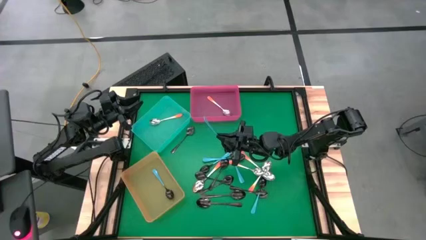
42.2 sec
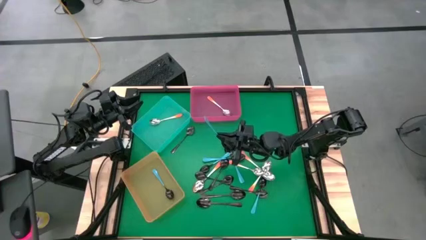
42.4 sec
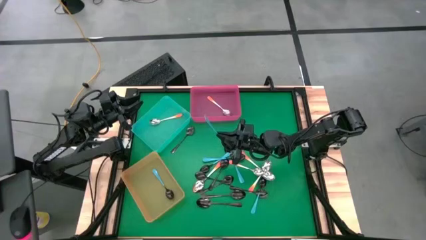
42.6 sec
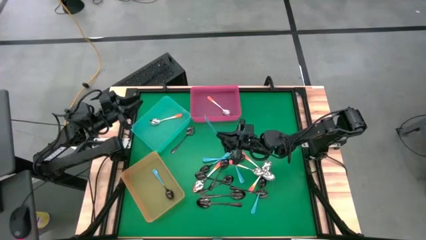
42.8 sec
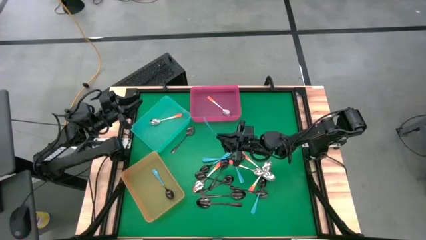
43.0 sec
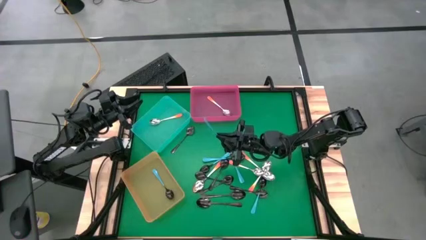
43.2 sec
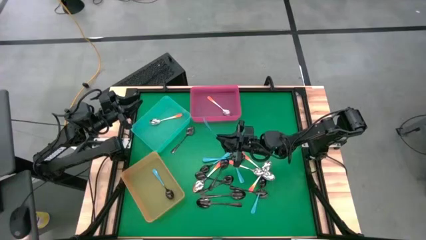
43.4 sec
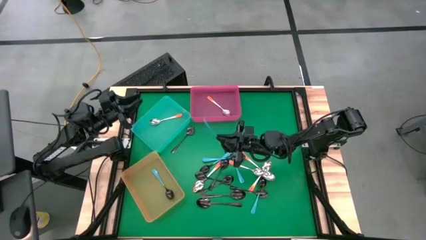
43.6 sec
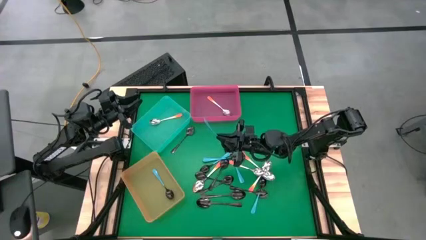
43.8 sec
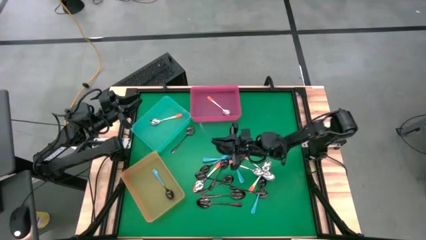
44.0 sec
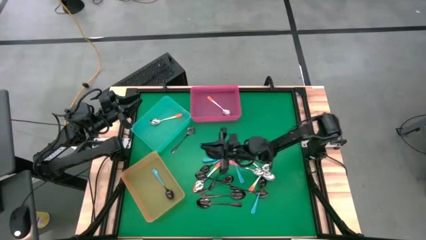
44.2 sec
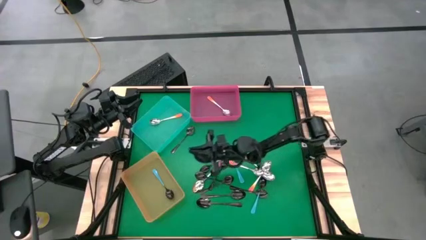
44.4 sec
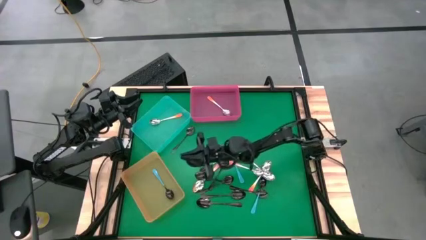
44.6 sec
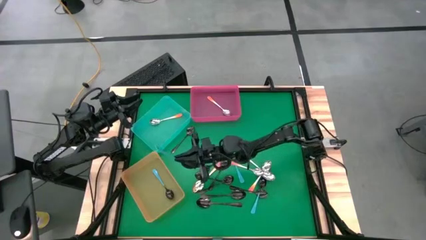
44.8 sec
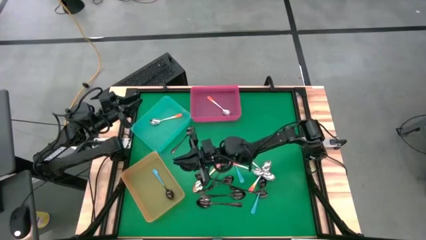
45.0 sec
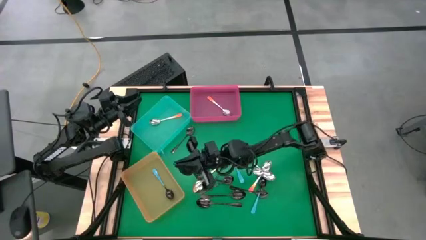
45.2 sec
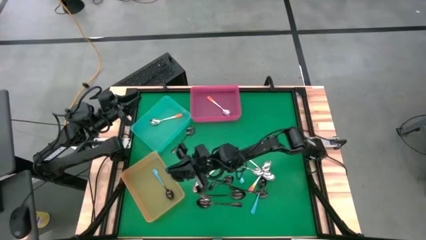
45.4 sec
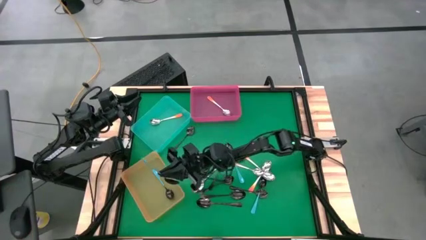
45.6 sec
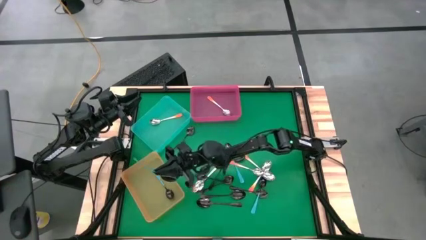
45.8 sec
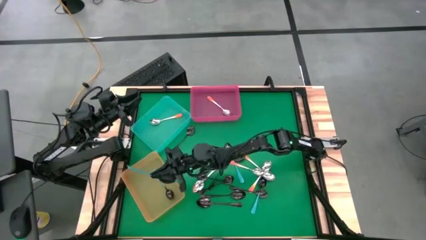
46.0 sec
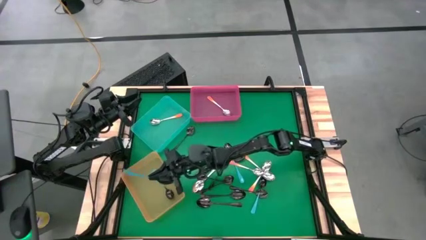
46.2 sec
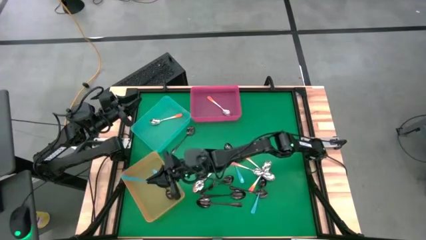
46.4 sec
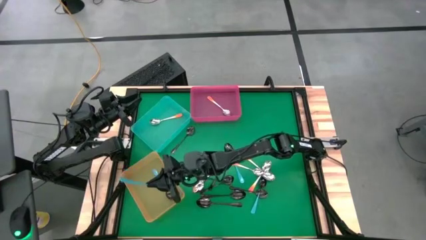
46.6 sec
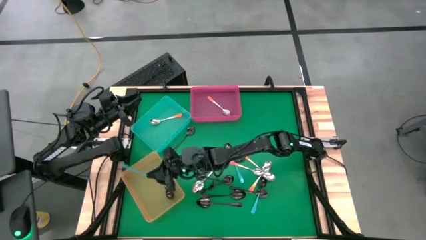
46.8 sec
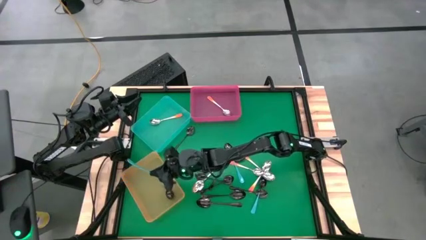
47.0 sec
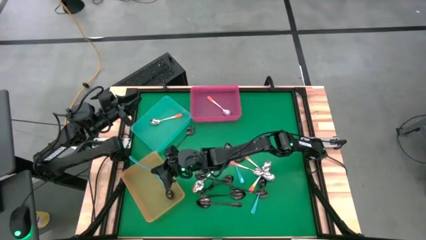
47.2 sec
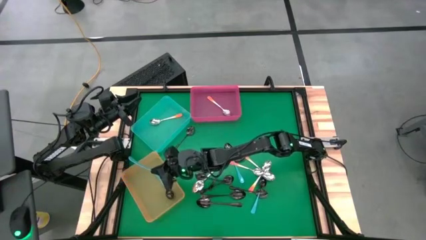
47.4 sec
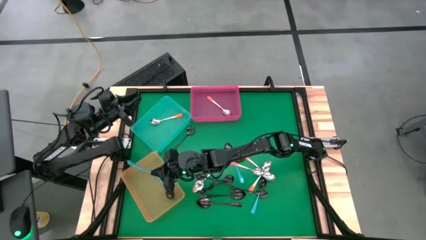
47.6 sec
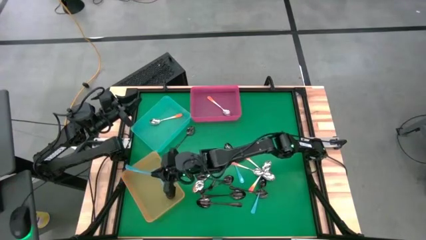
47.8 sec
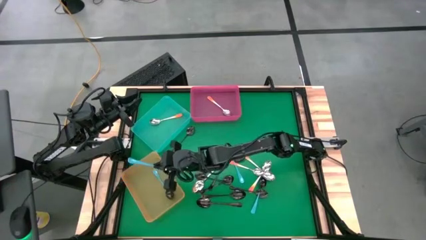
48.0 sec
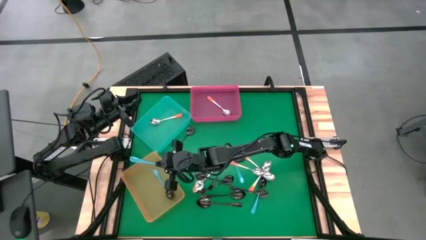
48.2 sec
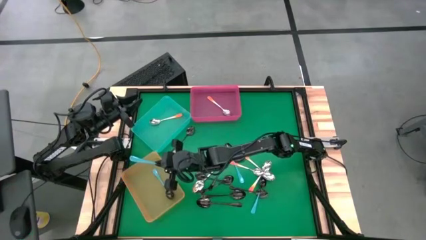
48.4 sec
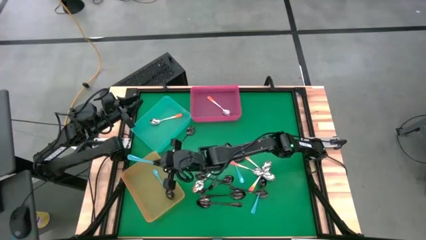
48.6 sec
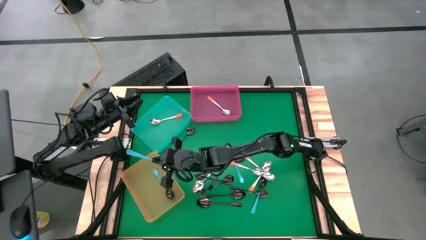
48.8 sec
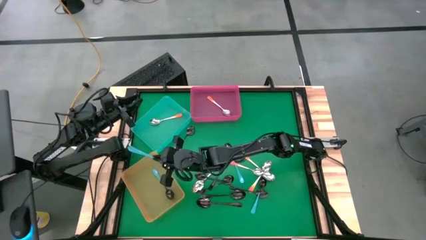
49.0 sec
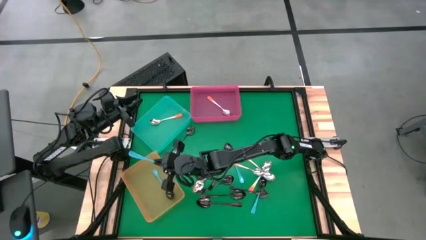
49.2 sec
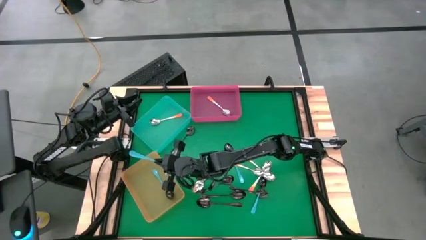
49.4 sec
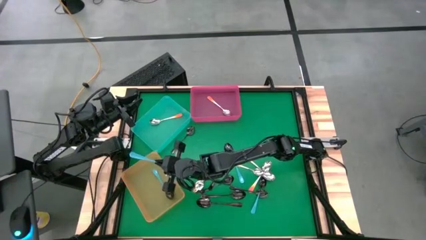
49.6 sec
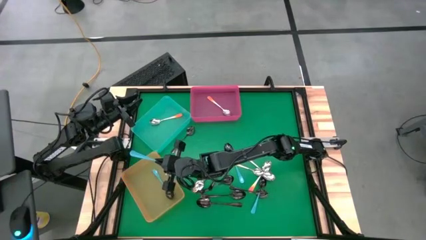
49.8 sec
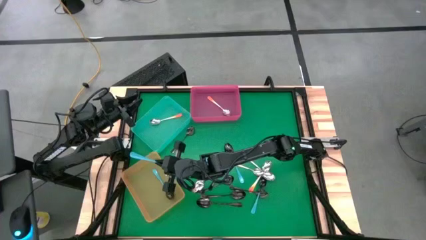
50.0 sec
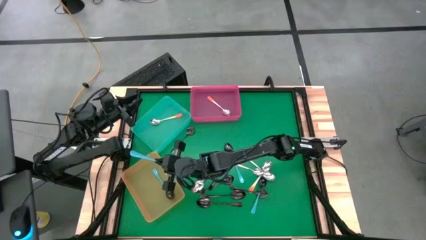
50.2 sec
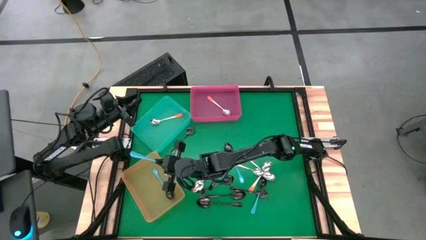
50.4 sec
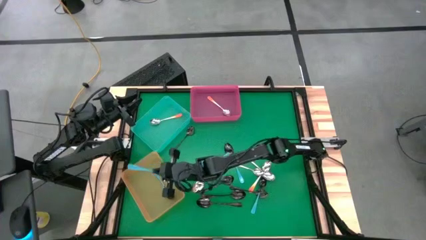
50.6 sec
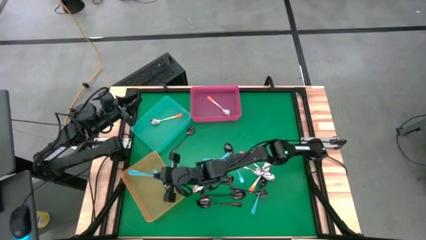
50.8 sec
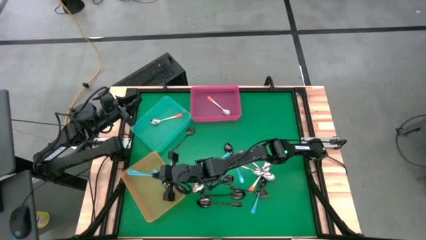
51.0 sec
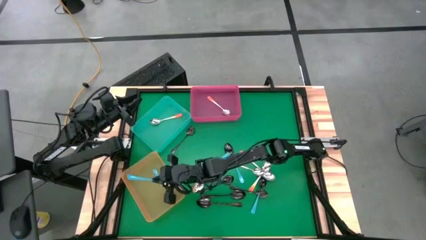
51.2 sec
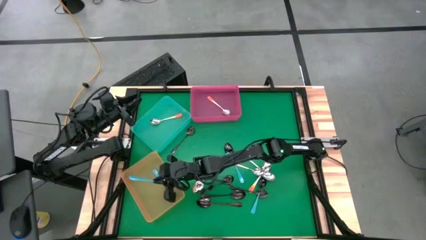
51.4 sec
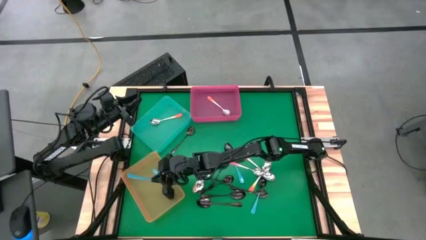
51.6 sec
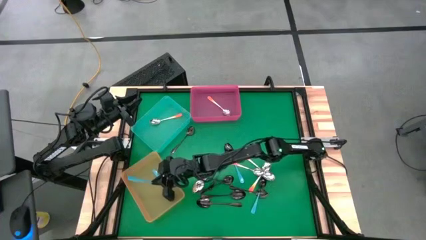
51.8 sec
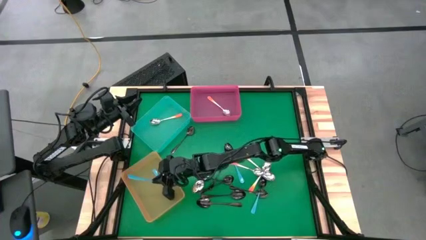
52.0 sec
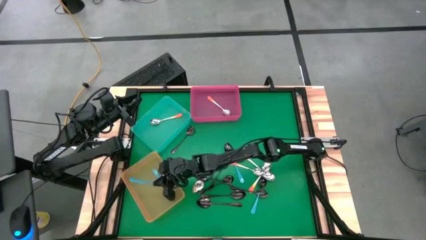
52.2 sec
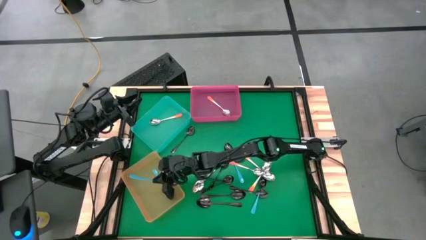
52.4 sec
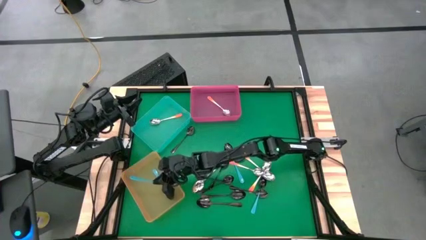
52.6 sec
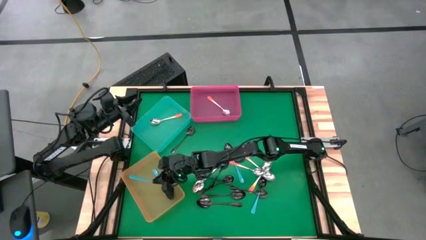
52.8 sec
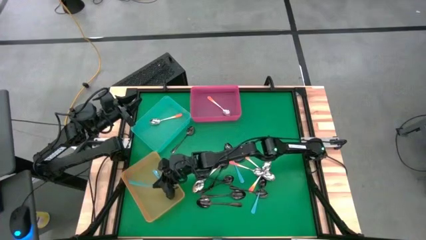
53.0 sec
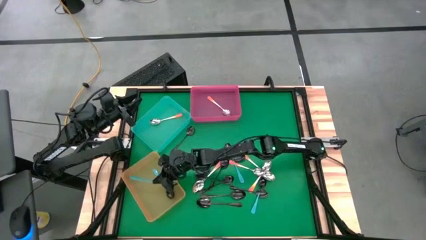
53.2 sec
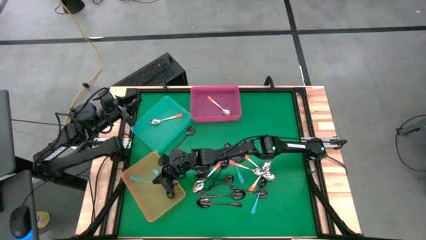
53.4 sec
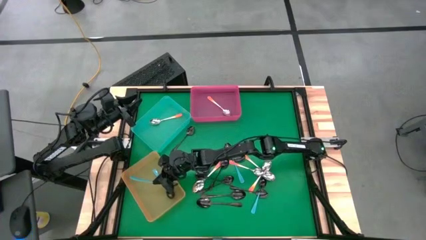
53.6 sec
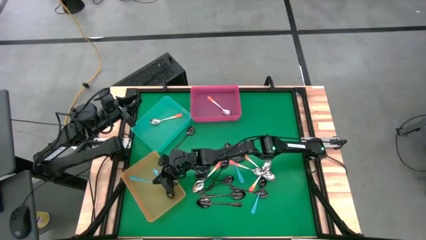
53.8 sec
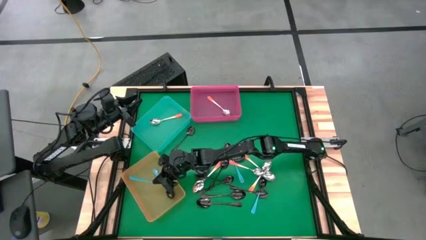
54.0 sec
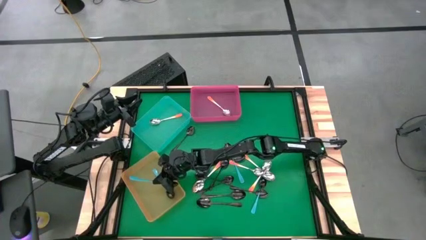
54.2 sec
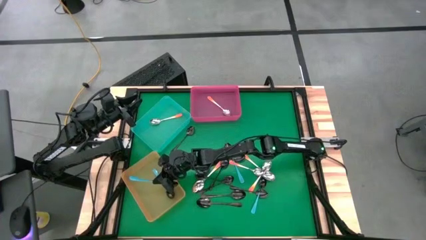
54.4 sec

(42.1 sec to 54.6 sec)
Task: Sort silverware by color (type)
Put the blue spoon into the orange bin

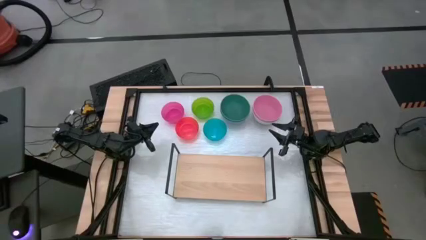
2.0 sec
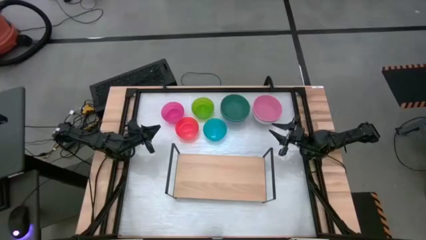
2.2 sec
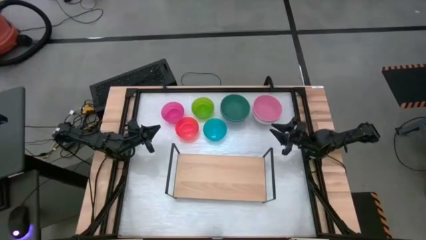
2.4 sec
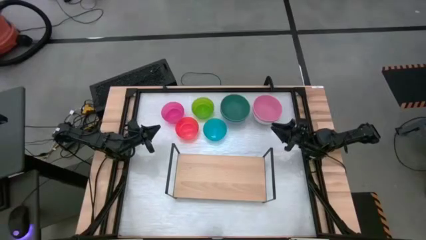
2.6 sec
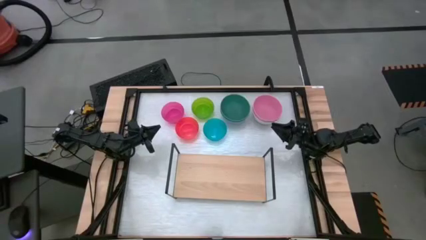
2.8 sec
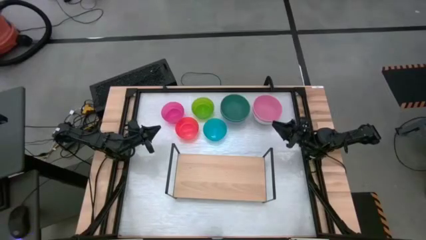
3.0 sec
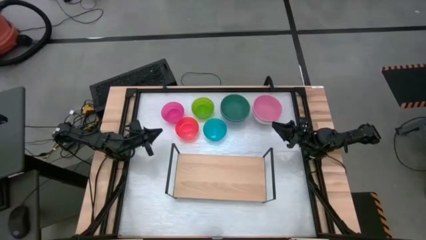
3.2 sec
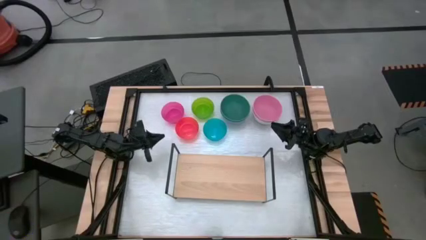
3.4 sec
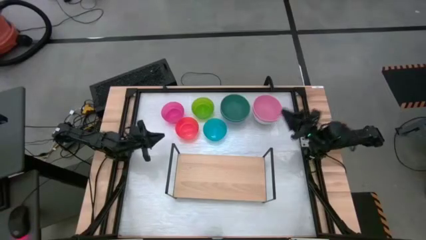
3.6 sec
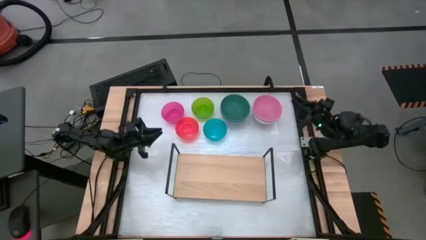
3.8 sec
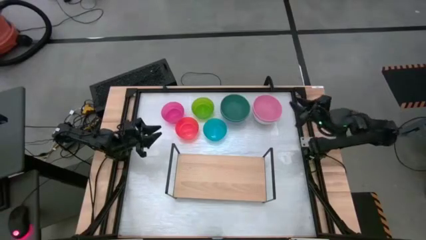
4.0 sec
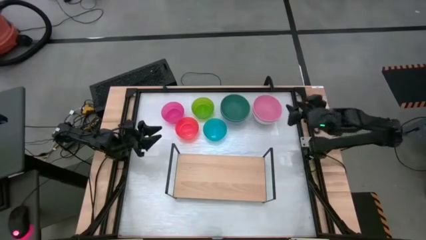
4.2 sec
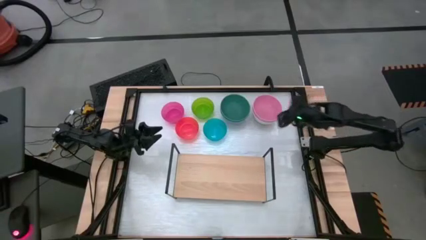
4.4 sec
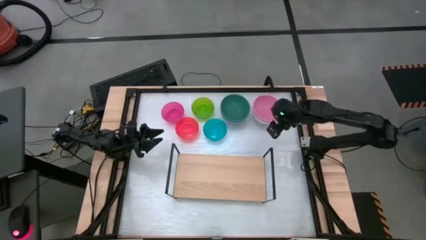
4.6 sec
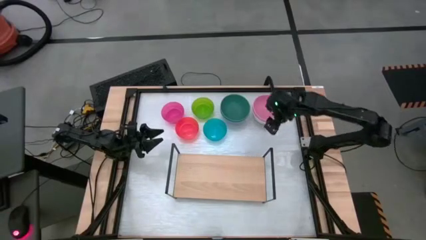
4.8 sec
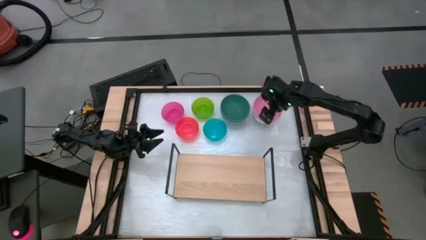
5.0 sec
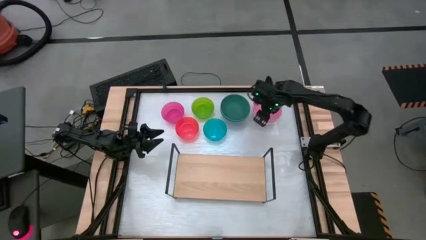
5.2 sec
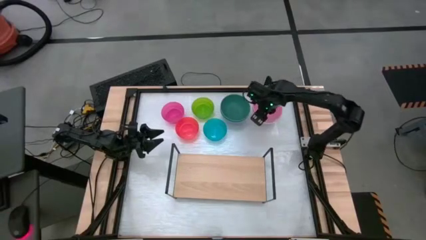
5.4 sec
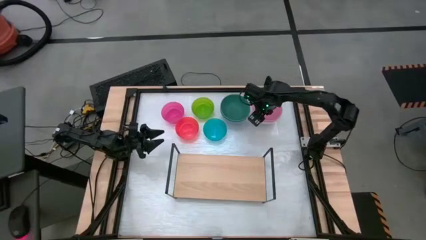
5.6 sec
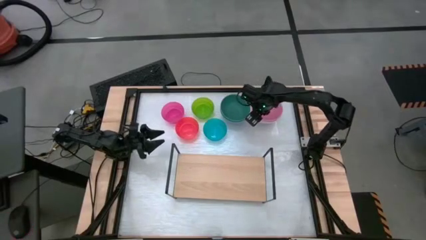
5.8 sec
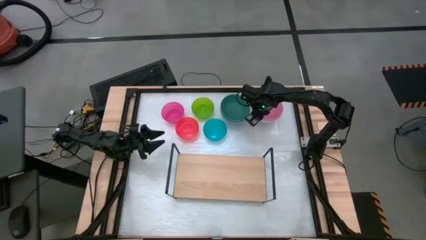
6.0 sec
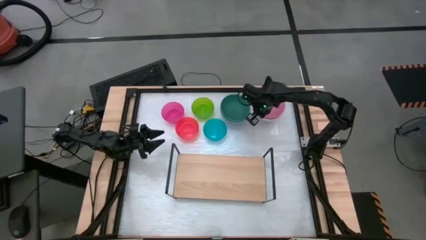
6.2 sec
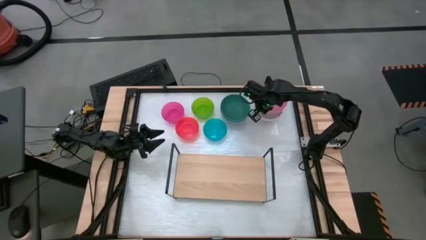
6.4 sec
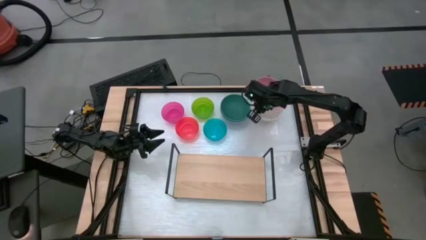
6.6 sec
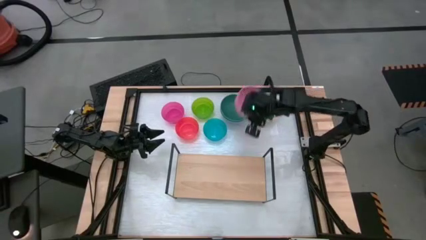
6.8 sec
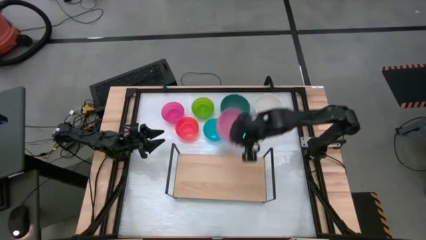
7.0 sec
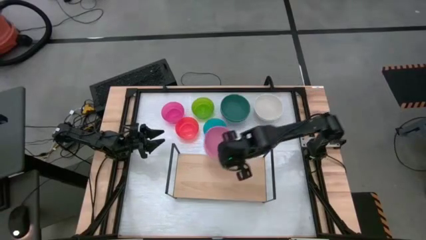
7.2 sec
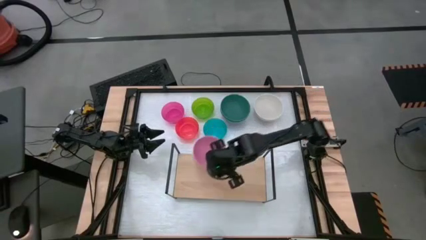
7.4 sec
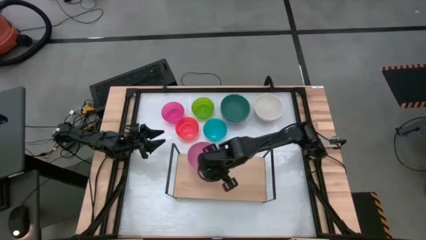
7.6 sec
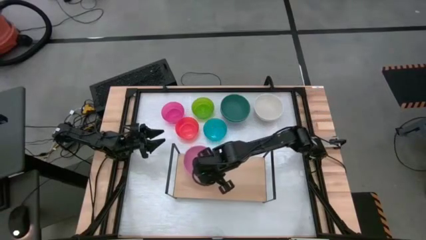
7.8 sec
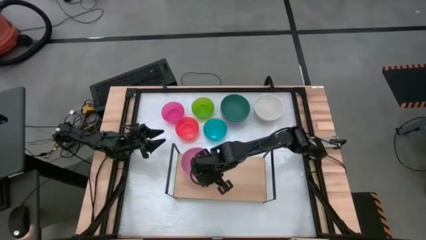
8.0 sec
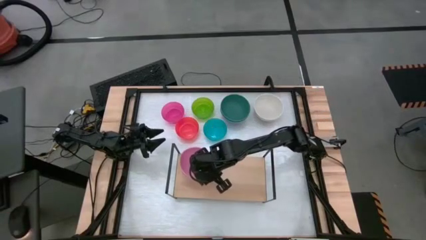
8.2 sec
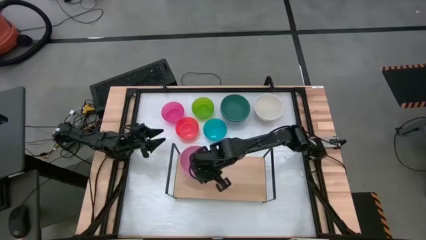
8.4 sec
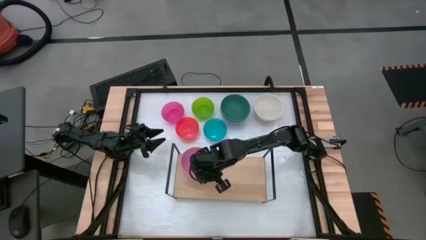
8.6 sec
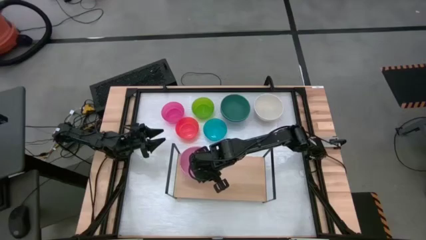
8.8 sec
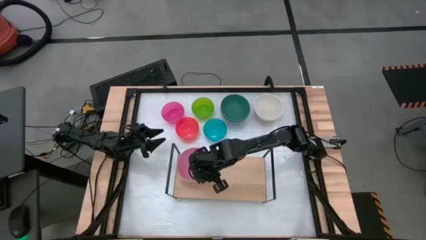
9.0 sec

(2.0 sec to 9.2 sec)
Task: Place and stack bowls onto a shelf
Put the big pink bowl on the shelf
